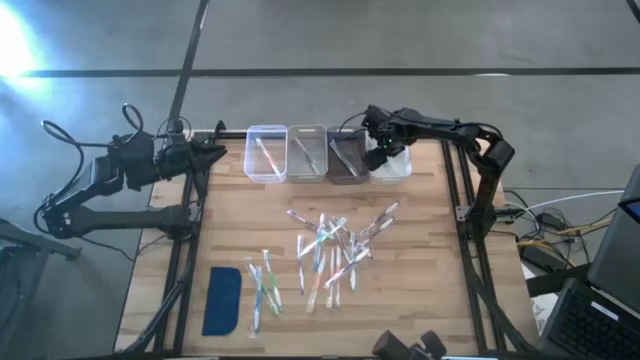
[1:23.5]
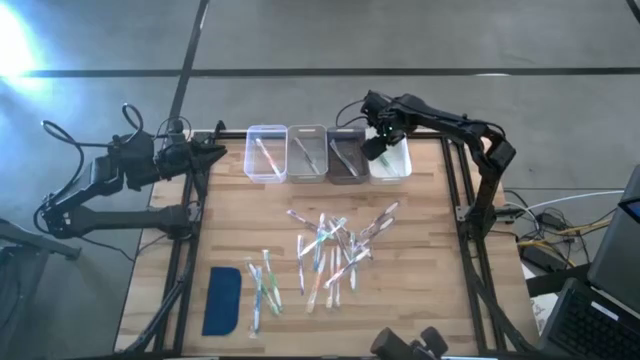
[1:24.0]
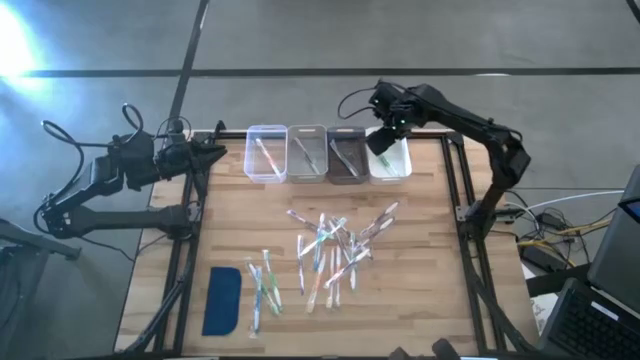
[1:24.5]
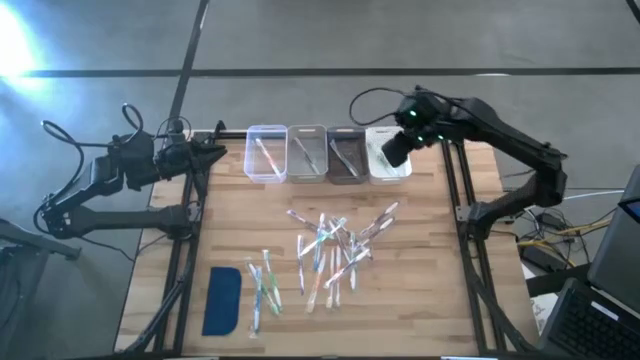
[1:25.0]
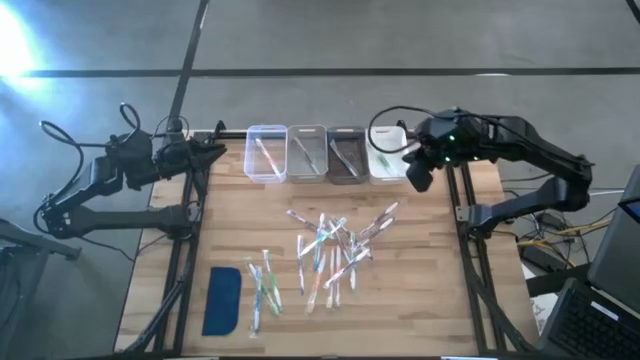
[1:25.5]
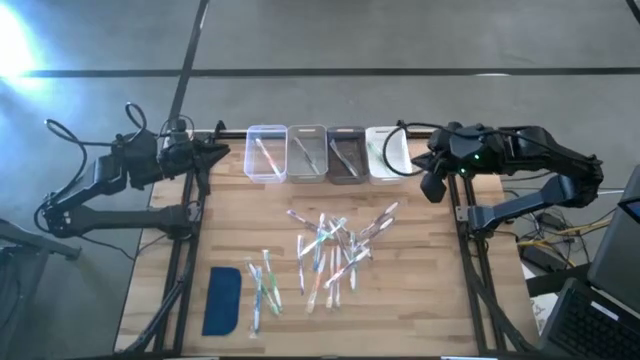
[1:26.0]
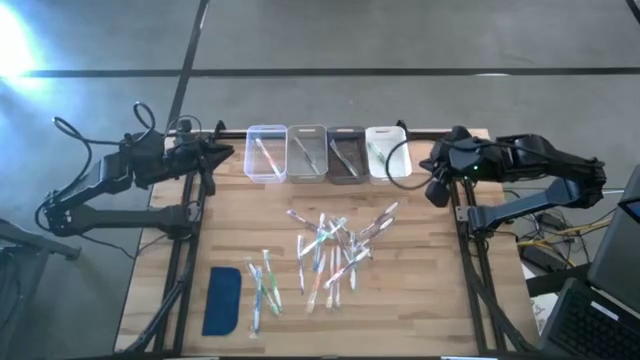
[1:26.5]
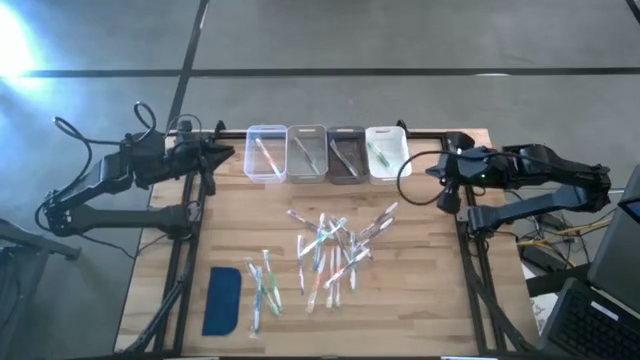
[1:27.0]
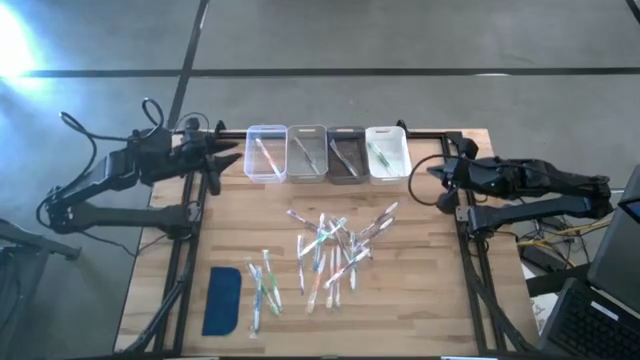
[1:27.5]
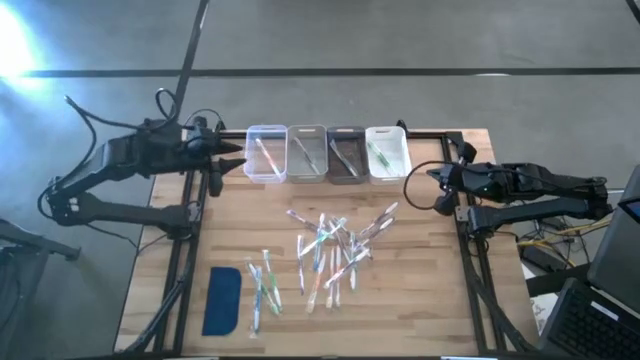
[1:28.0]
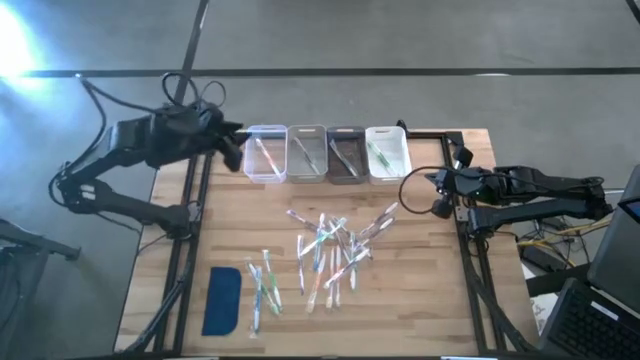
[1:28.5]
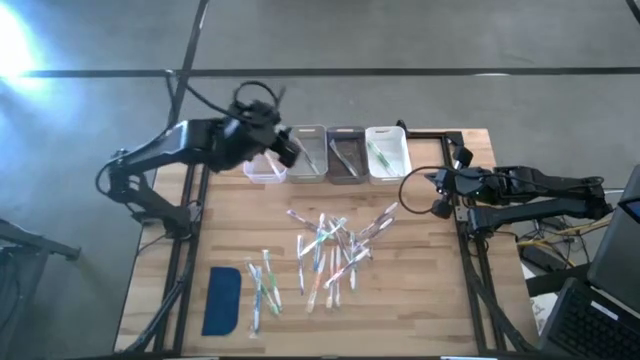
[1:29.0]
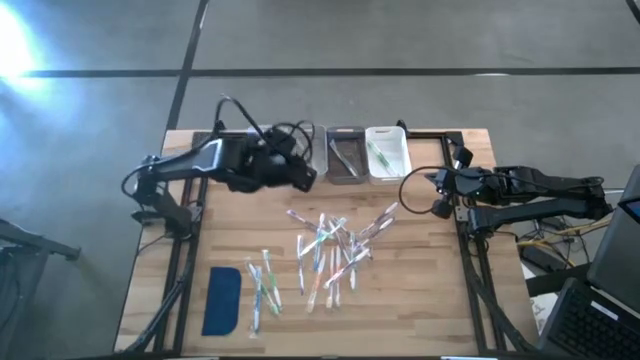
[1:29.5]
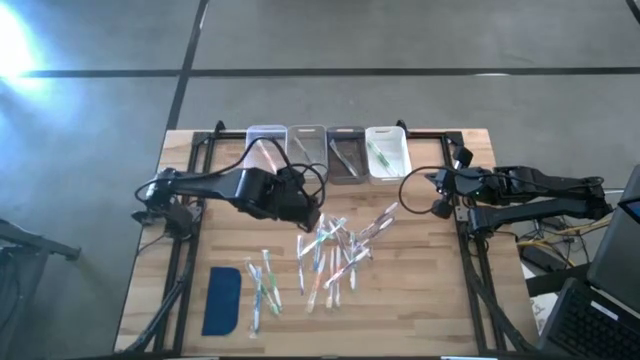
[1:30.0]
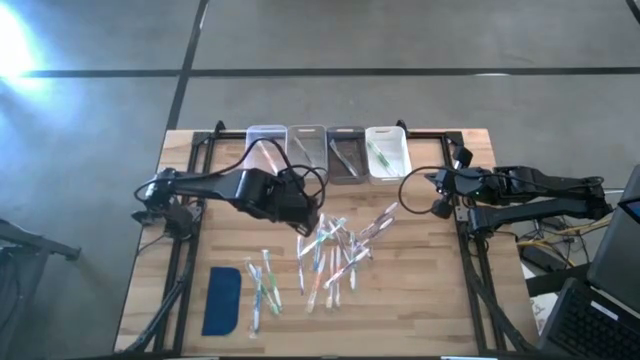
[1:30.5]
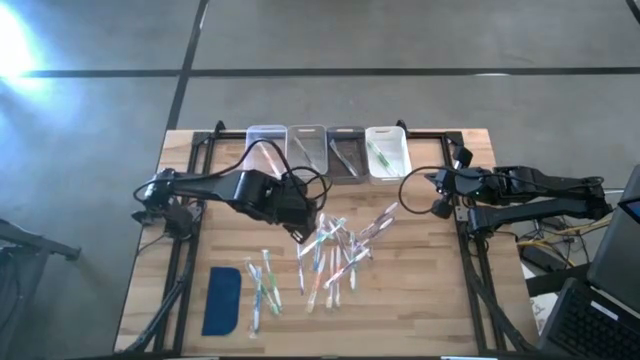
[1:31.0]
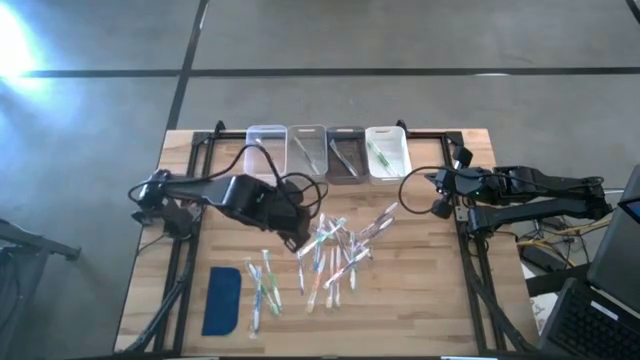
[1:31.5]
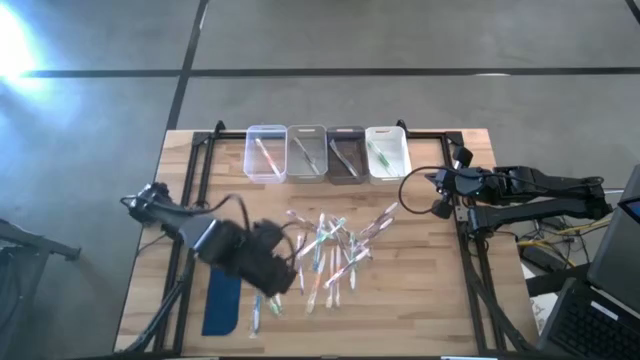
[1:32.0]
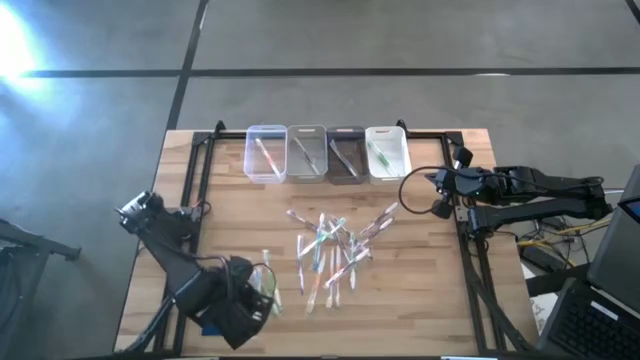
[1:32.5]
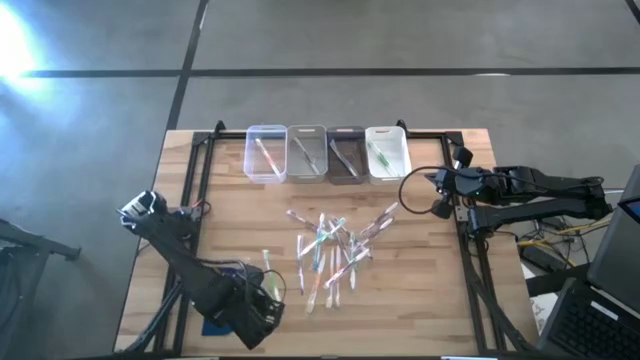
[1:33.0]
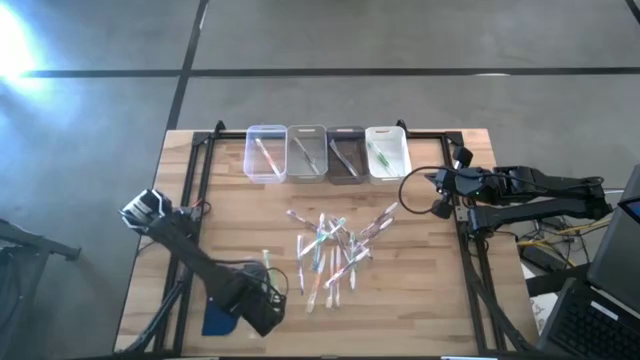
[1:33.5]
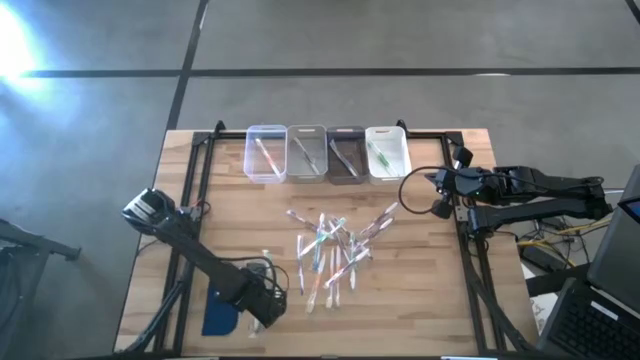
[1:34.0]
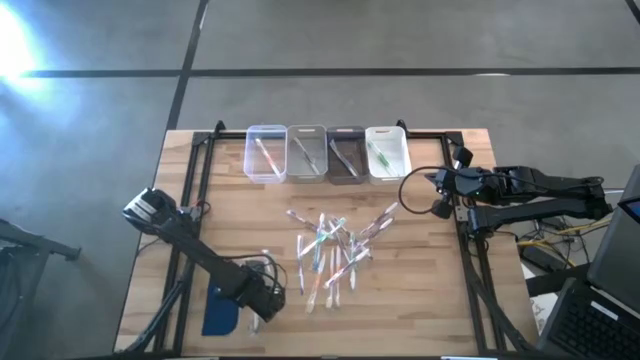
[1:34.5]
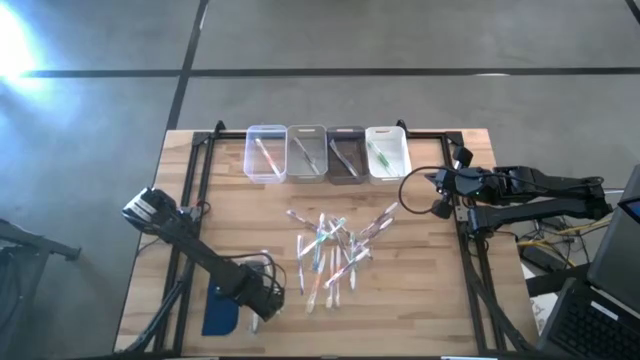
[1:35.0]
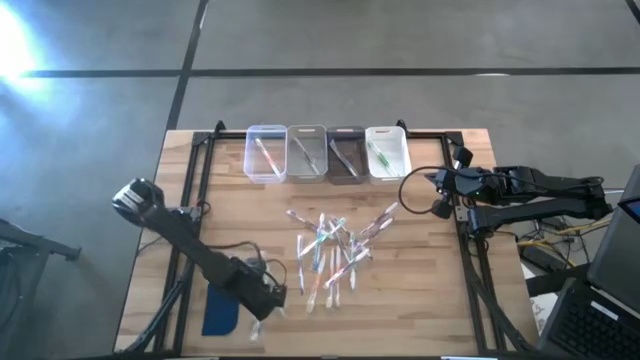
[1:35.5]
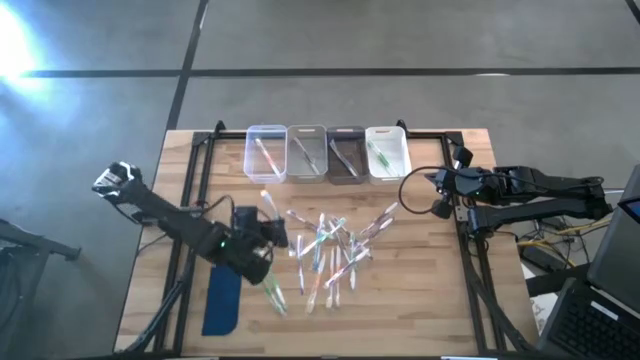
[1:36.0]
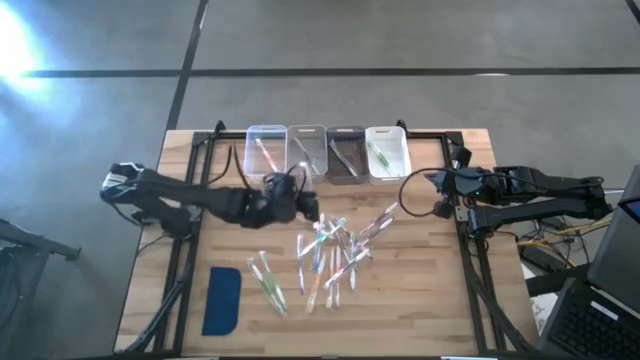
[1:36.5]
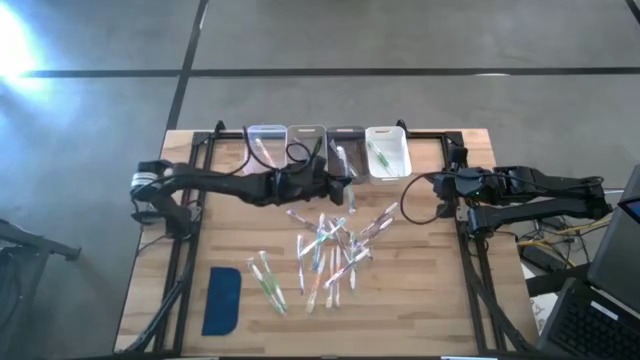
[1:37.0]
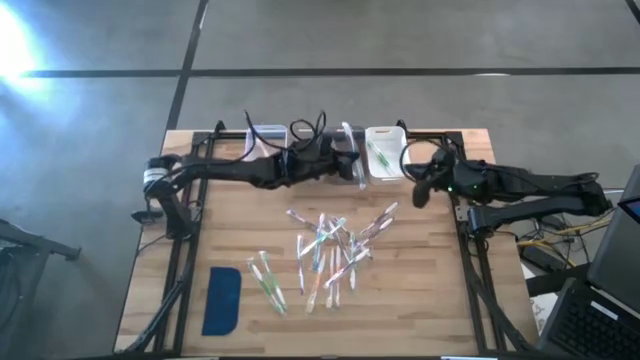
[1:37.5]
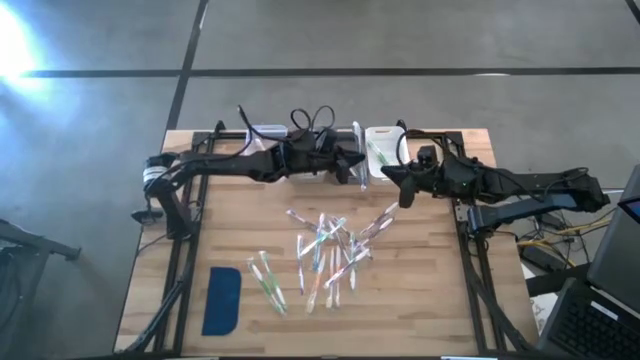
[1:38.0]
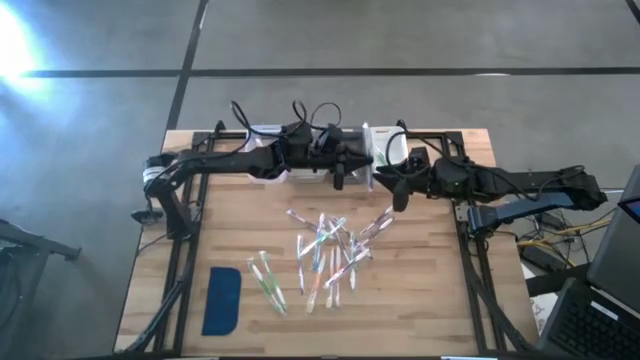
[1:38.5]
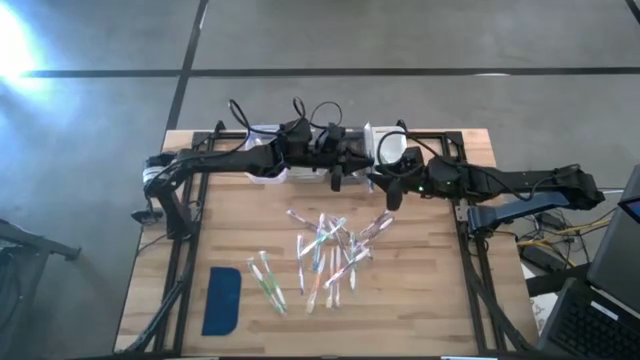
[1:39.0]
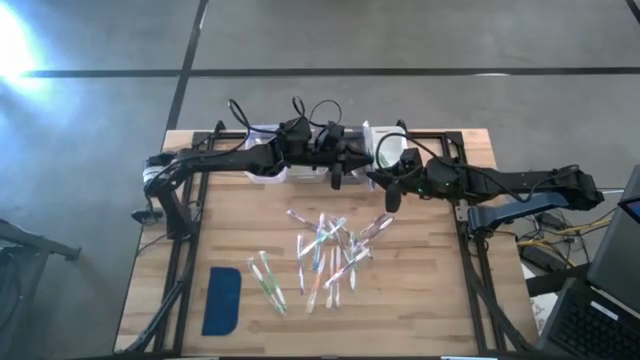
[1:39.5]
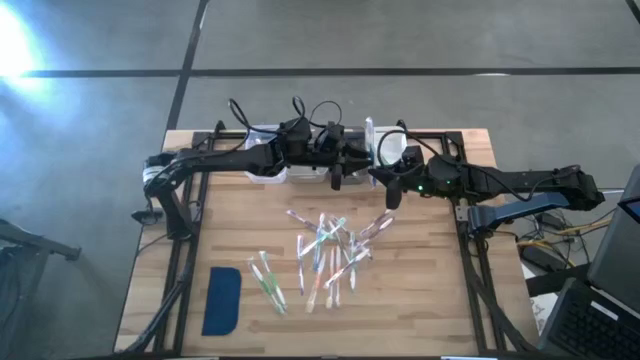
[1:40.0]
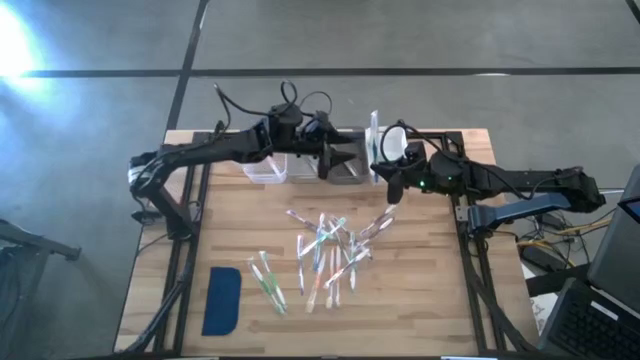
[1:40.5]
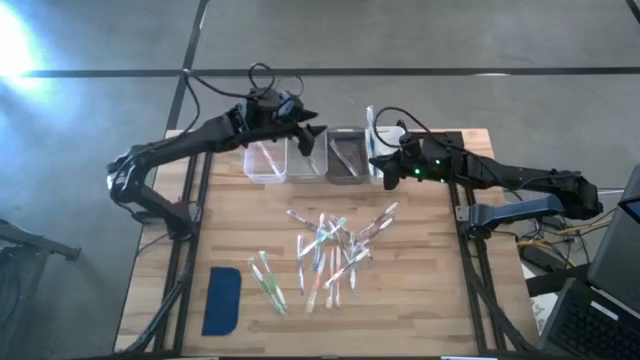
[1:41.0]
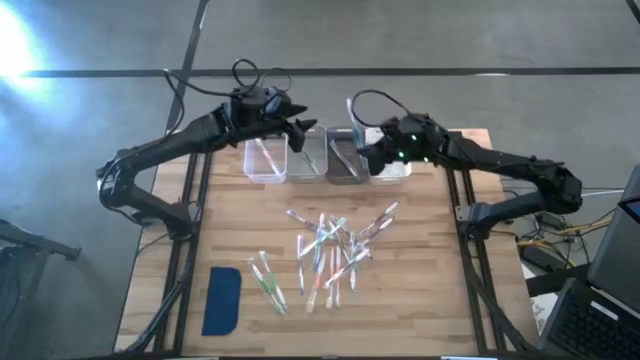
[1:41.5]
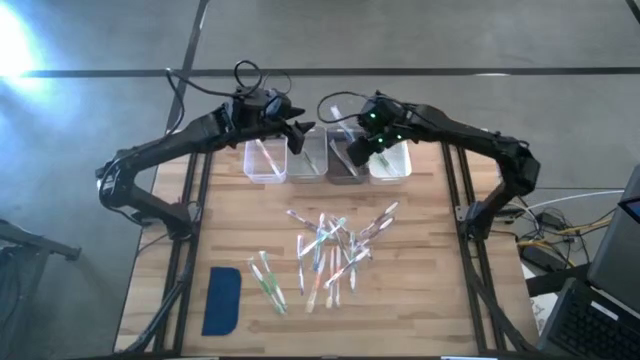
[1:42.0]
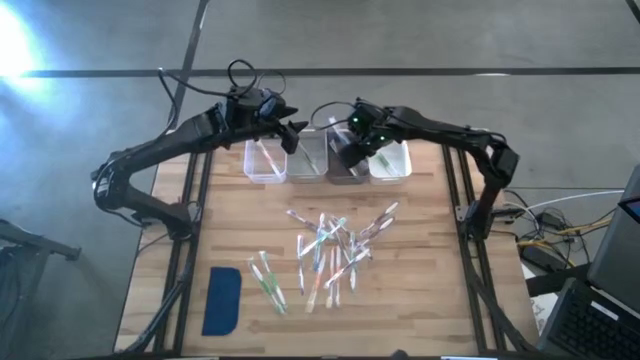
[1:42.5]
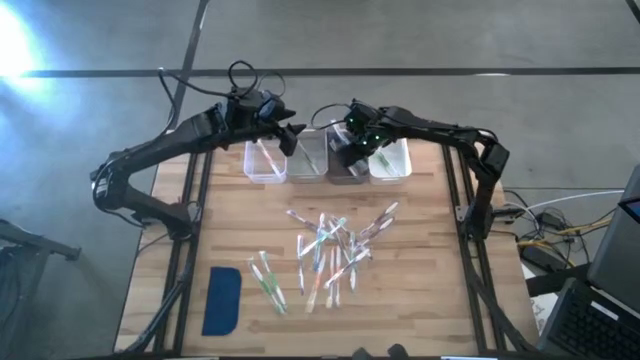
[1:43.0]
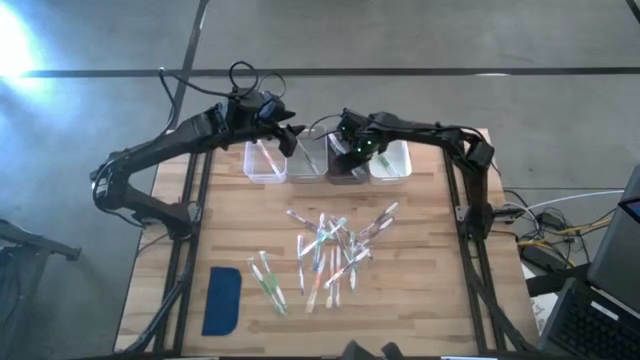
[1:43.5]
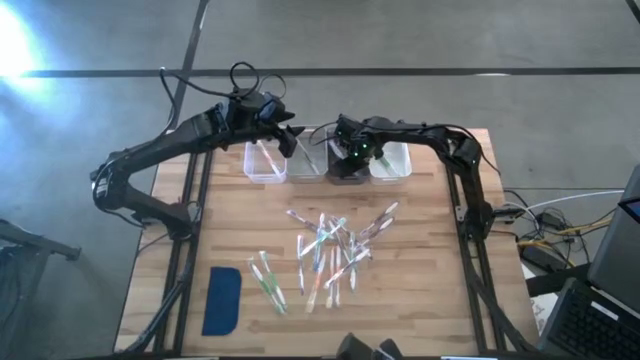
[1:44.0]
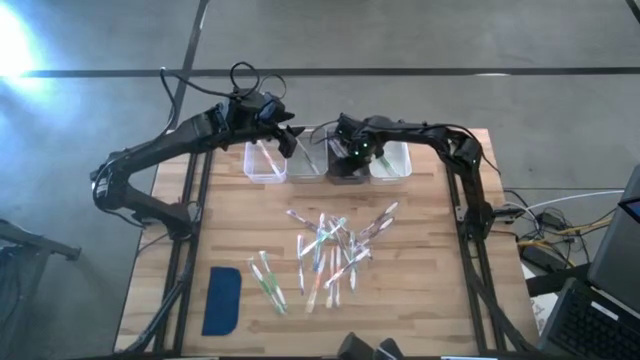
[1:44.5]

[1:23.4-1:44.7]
Task: Pick & Place Toothbrushes
Put the blue toothbrush into the black transparent bin
